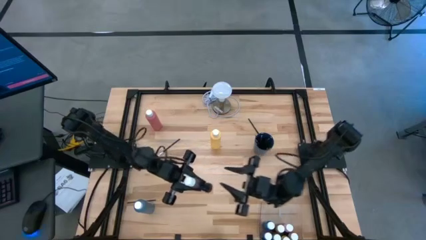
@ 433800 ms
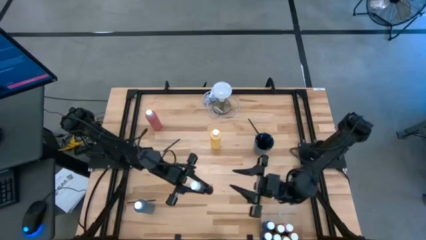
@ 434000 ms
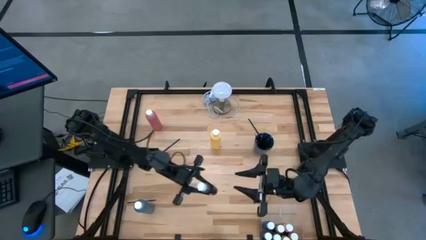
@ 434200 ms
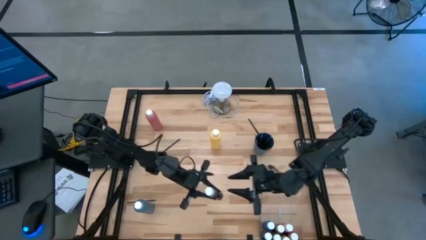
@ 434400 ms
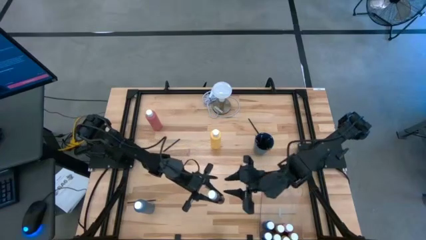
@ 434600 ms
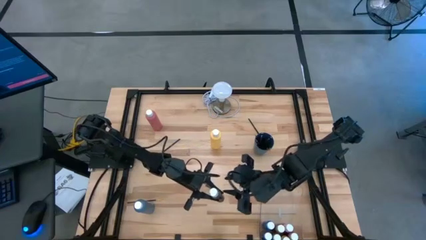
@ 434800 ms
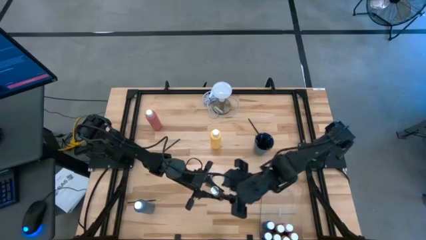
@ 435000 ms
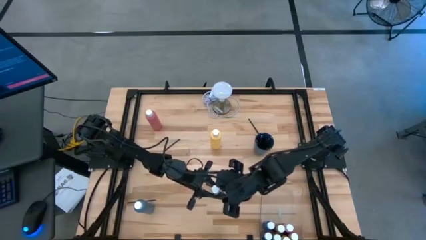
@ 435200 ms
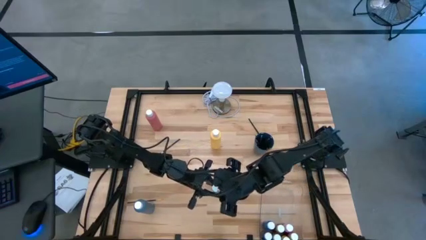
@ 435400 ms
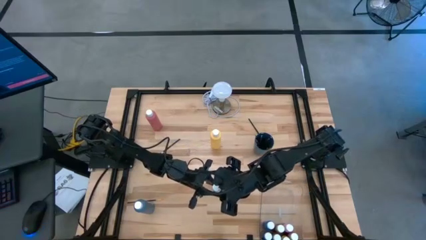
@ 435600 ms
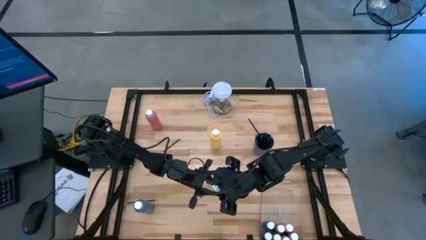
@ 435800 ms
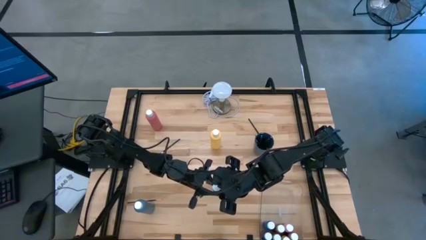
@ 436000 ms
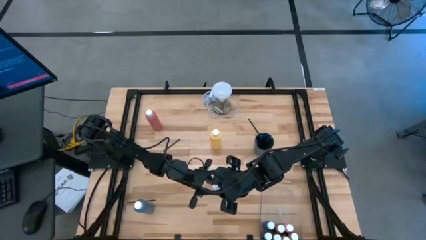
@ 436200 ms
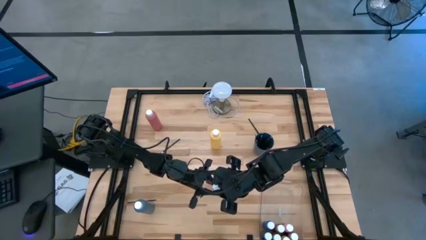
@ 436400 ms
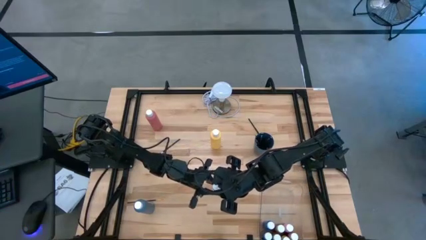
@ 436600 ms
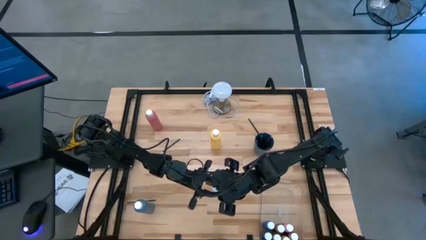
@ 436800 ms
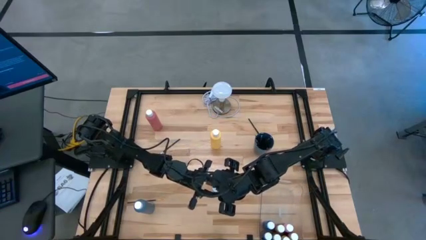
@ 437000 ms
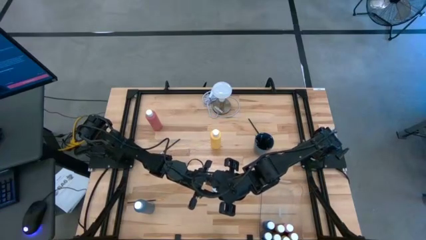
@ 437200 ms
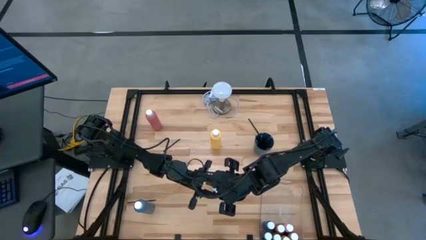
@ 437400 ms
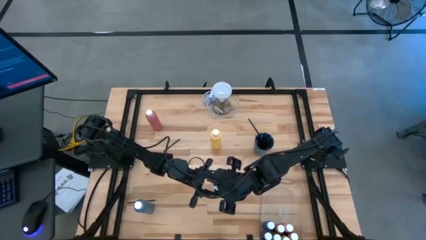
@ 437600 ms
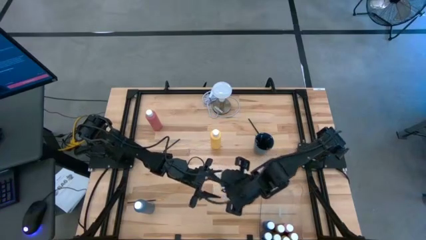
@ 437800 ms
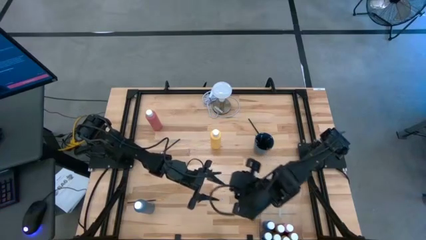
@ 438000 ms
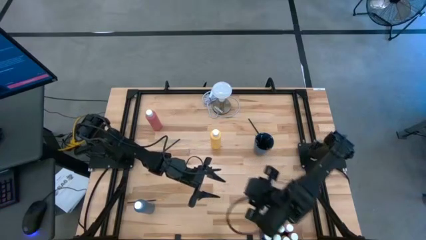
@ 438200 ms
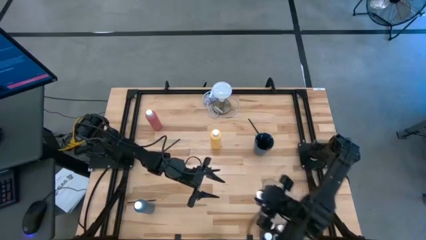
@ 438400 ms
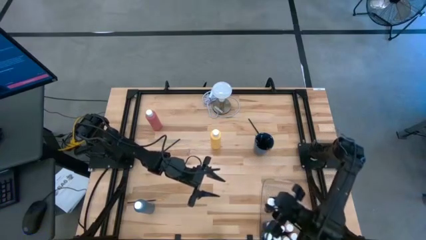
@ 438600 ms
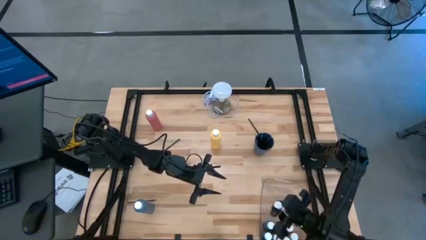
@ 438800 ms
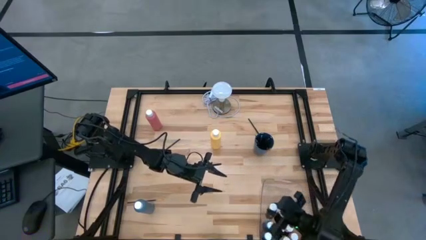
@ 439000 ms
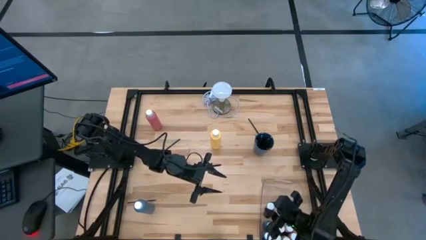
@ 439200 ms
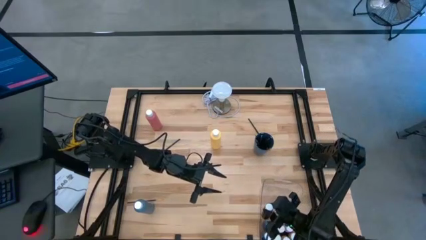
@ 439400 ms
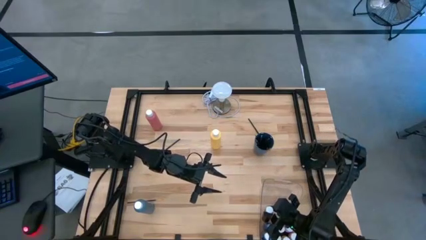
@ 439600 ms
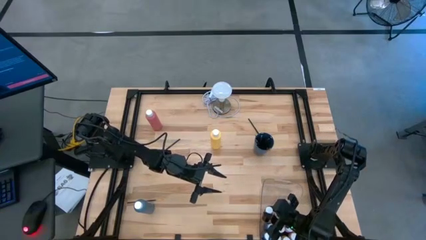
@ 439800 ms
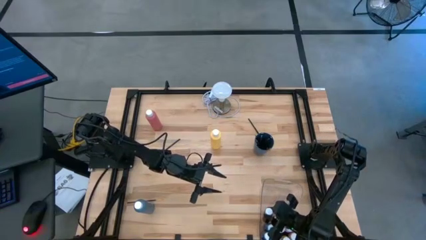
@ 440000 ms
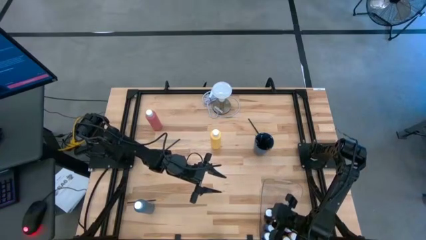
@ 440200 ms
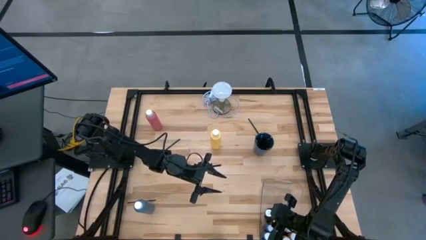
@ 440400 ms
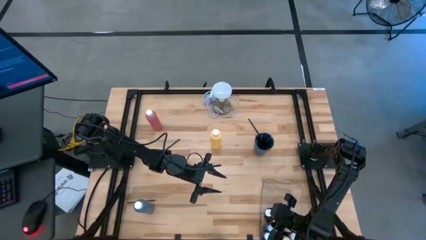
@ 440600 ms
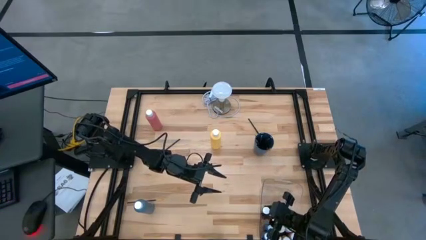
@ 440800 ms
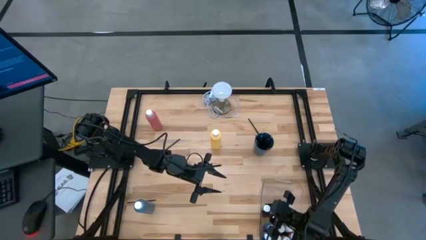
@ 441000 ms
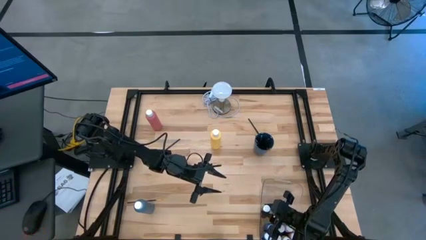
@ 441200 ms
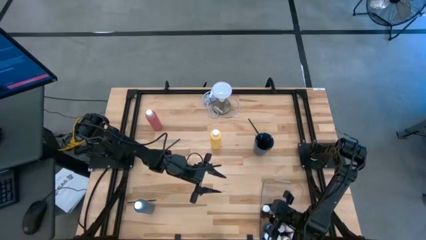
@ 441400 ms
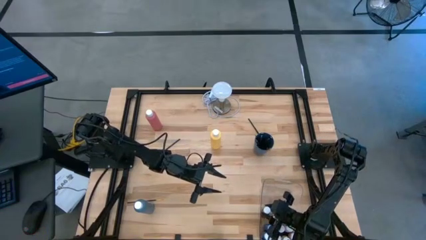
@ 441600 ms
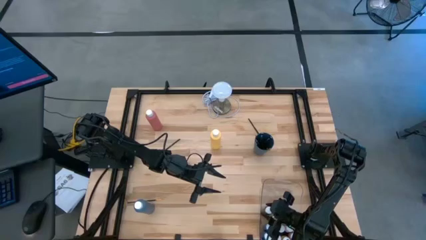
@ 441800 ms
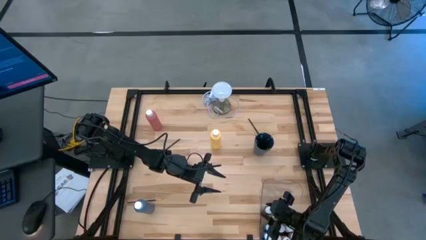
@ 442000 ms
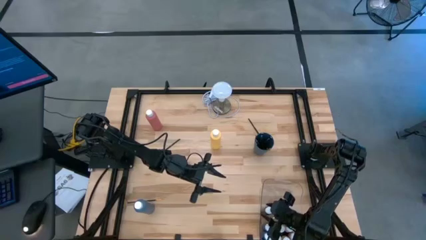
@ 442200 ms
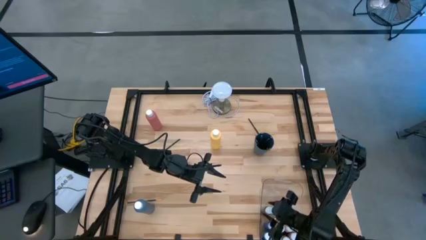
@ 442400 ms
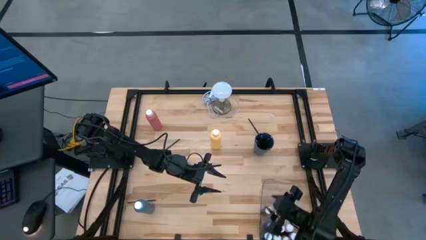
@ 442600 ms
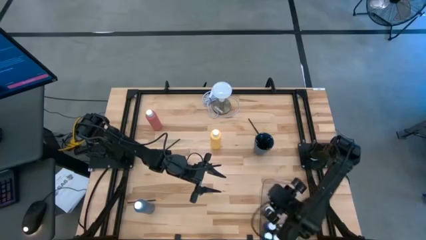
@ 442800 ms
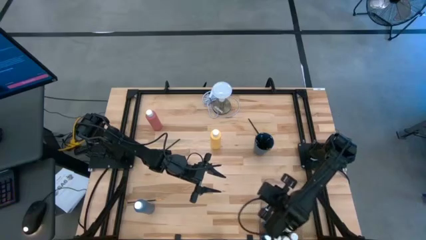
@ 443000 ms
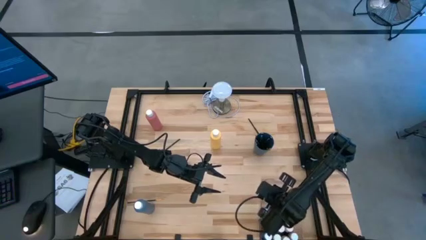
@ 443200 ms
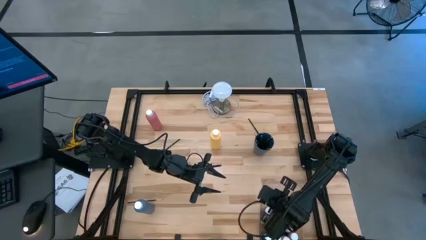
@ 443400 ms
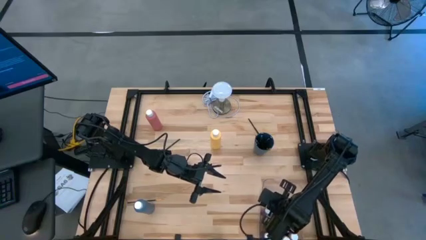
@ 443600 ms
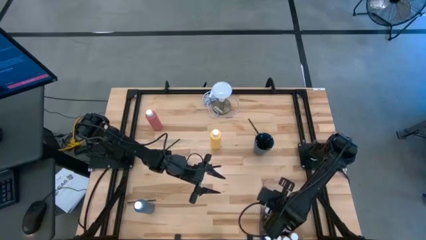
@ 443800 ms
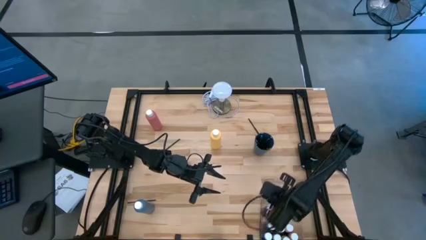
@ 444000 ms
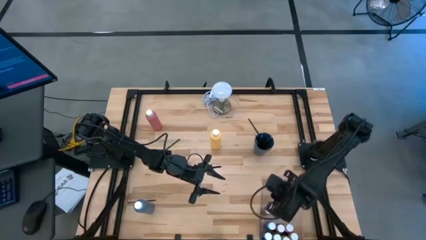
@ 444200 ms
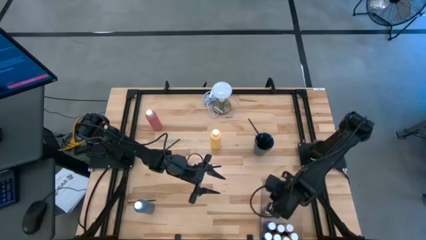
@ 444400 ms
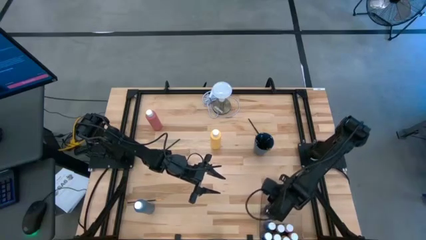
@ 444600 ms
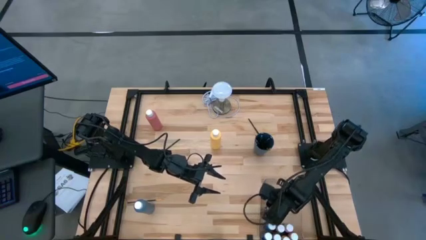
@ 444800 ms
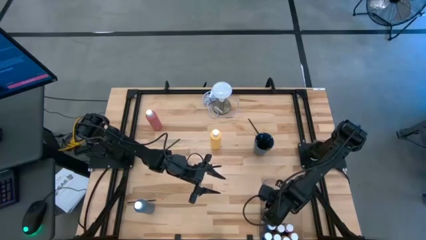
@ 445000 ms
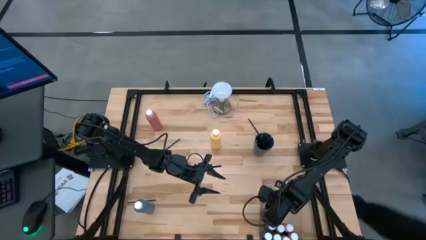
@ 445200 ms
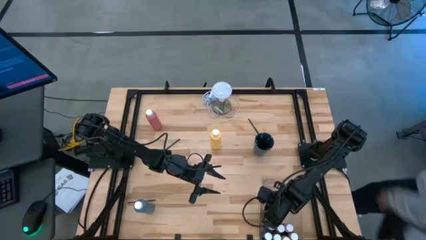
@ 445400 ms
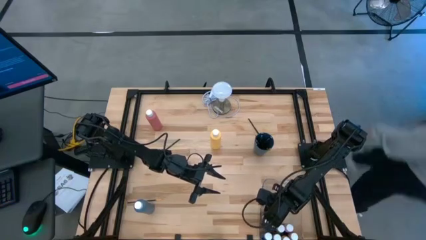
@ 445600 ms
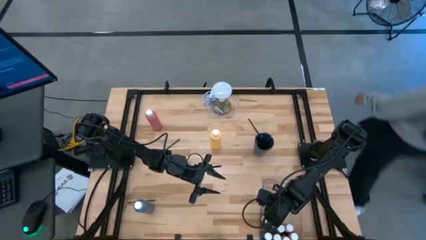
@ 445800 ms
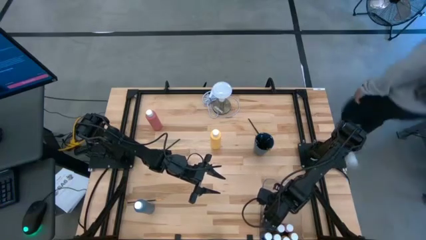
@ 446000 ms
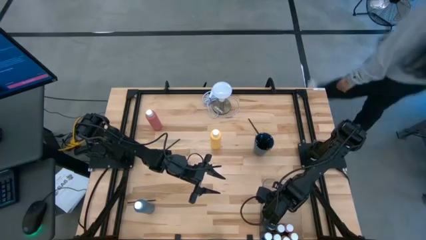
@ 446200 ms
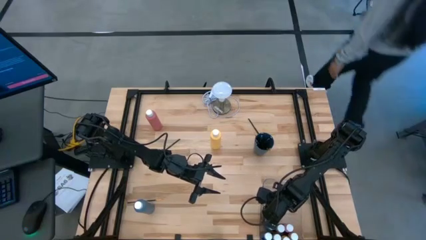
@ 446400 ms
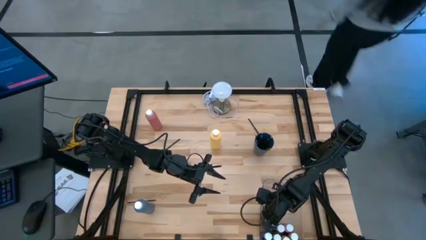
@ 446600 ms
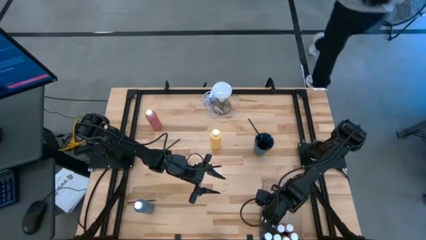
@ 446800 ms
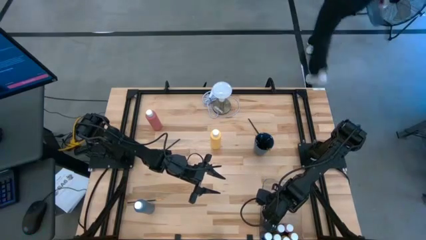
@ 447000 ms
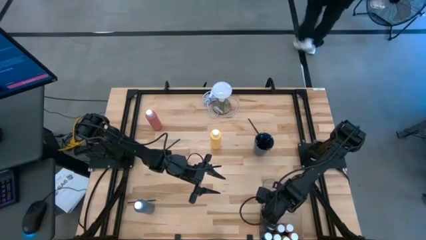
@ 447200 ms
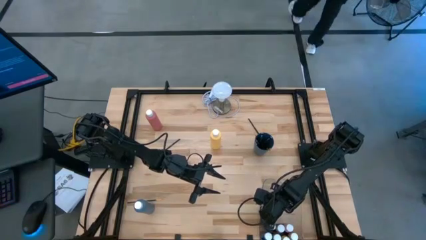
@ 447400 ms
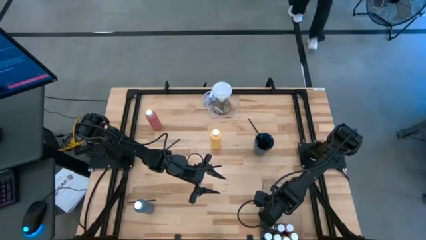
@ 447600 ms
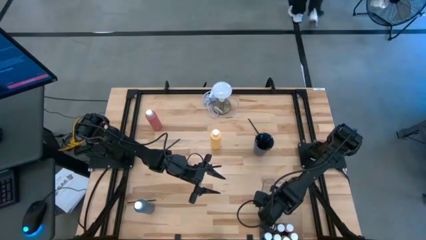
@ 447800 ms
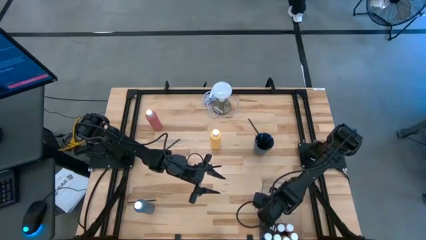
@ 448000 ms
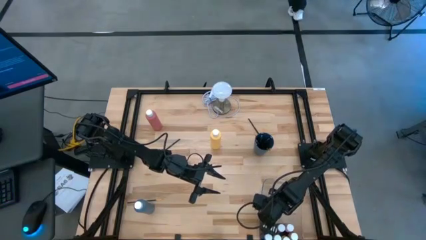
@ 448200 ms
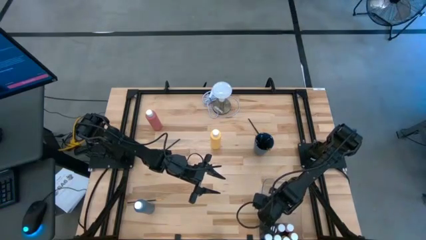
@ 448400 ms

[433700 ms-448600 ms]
Task: Pick & Place Paint Supplies
Put the small brown paint bottle into the transparent bin
